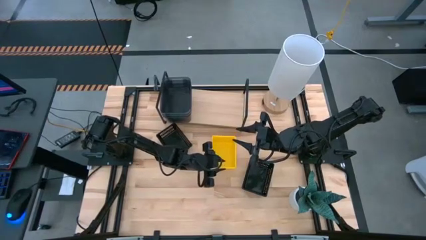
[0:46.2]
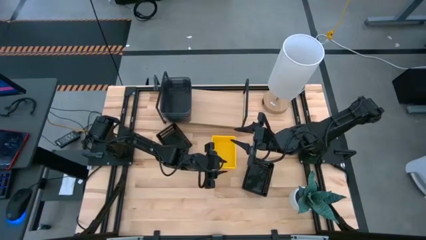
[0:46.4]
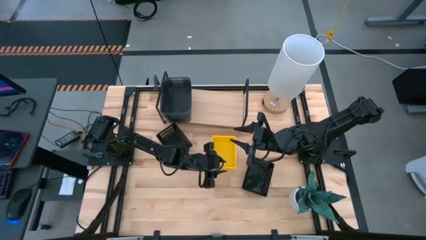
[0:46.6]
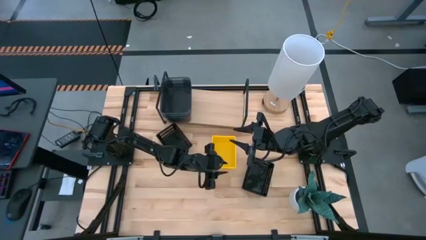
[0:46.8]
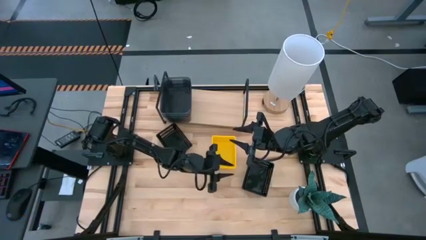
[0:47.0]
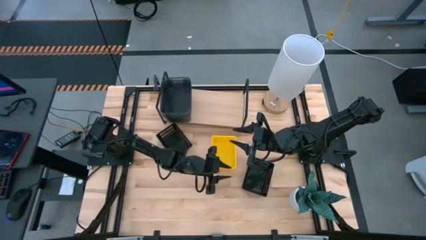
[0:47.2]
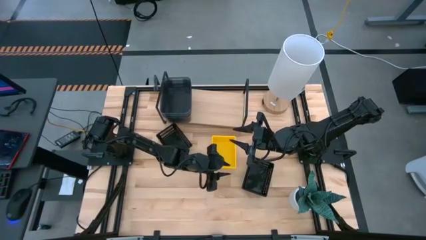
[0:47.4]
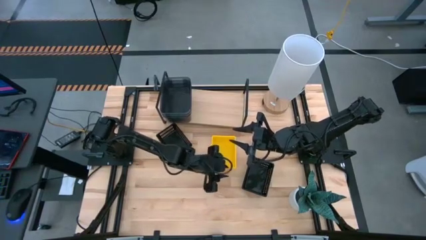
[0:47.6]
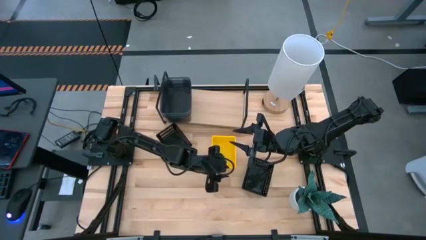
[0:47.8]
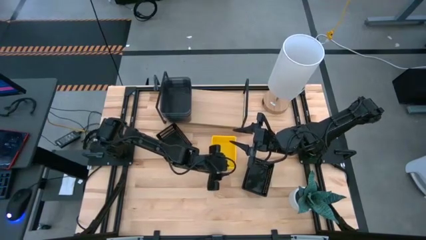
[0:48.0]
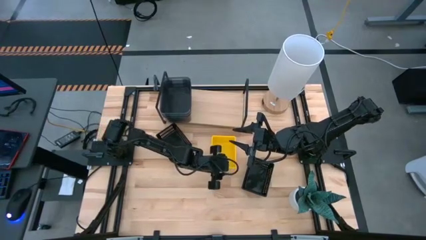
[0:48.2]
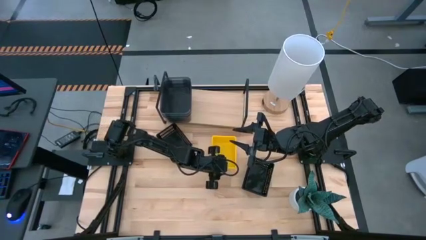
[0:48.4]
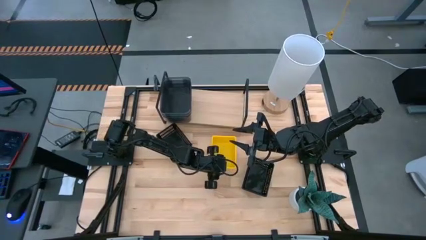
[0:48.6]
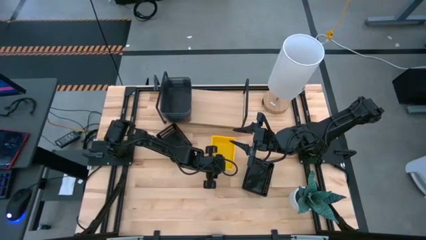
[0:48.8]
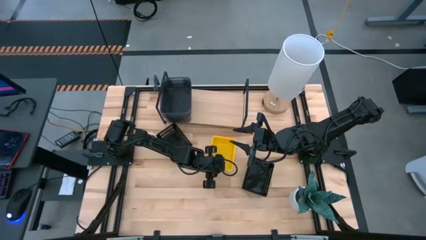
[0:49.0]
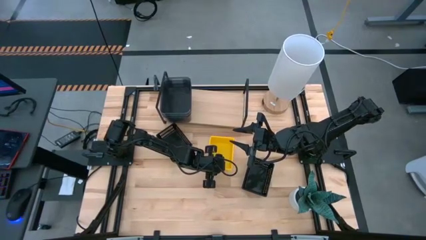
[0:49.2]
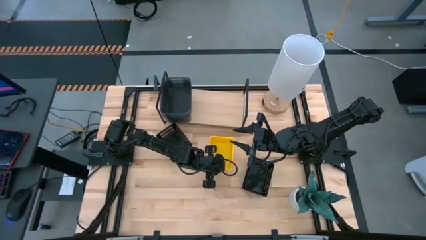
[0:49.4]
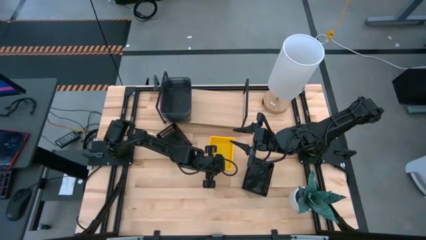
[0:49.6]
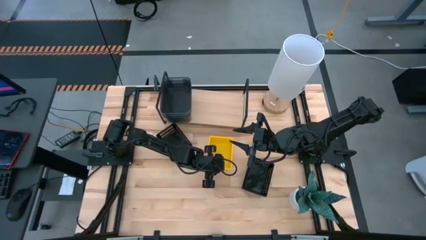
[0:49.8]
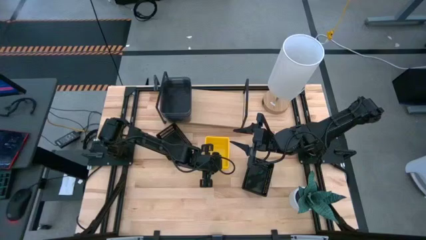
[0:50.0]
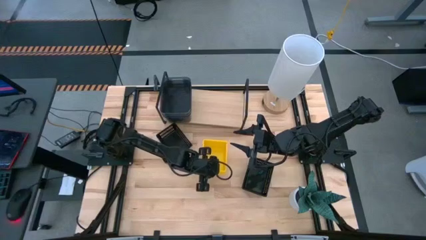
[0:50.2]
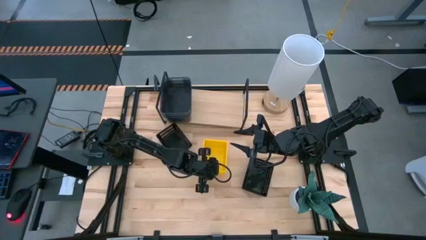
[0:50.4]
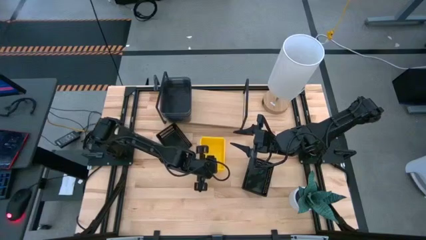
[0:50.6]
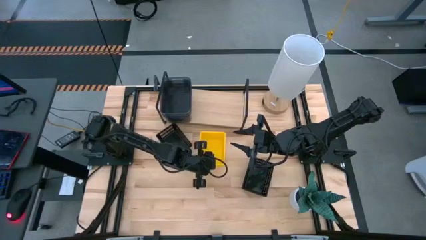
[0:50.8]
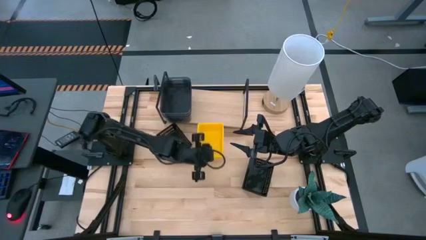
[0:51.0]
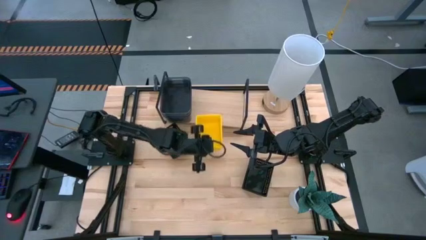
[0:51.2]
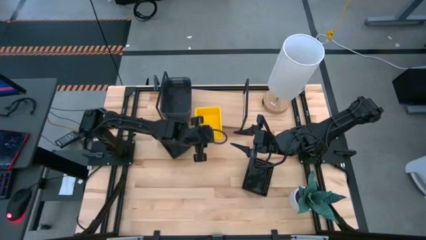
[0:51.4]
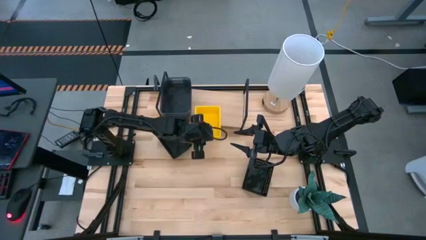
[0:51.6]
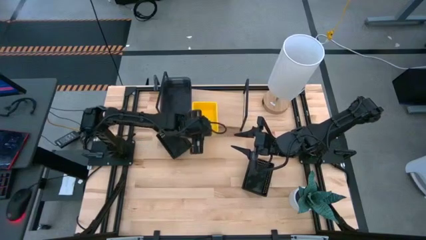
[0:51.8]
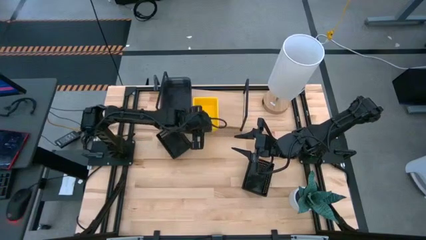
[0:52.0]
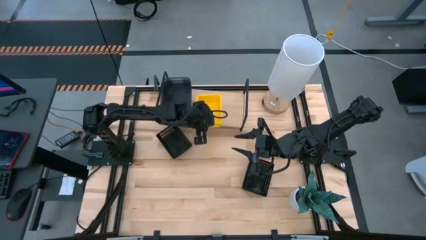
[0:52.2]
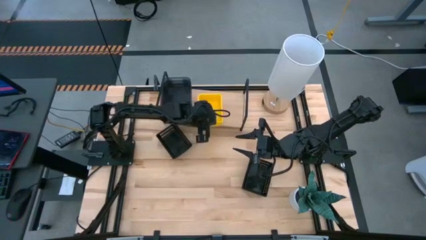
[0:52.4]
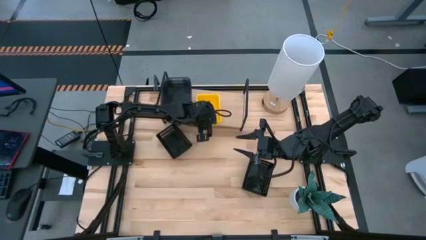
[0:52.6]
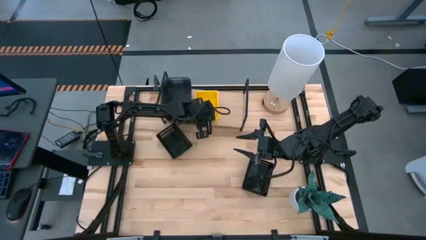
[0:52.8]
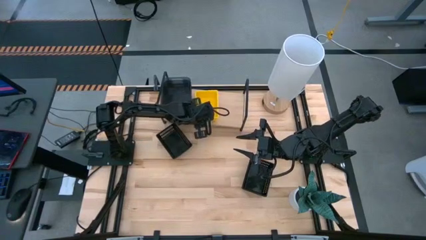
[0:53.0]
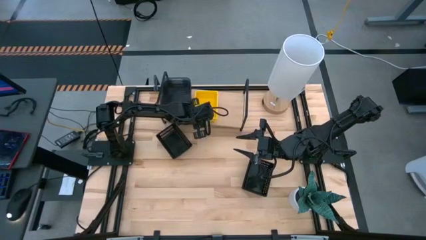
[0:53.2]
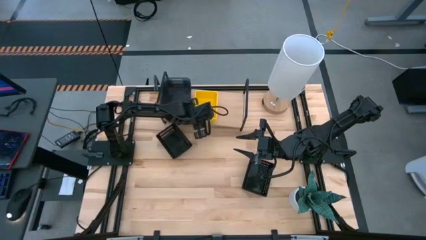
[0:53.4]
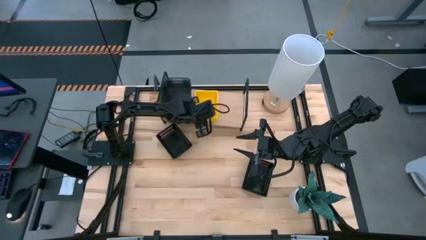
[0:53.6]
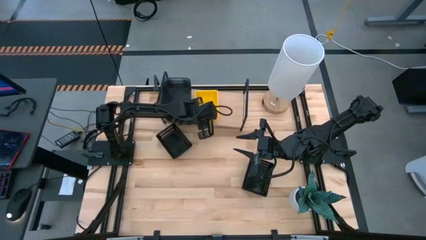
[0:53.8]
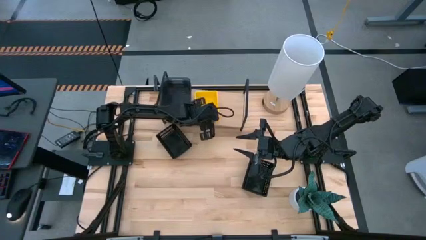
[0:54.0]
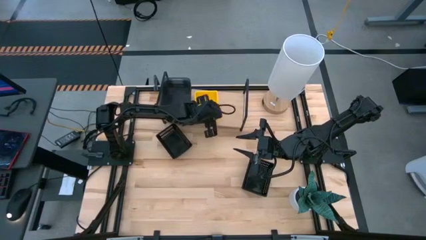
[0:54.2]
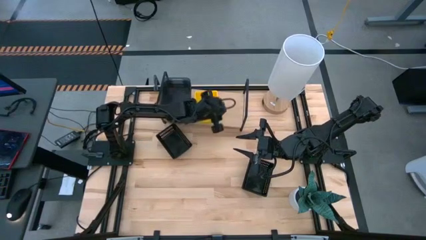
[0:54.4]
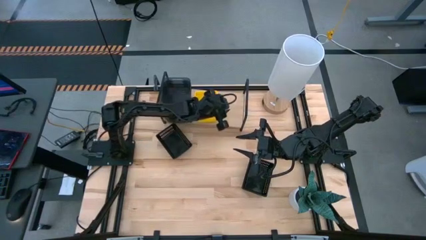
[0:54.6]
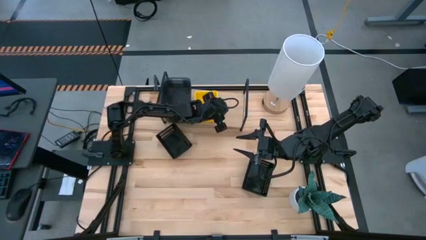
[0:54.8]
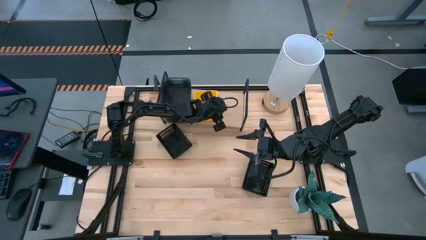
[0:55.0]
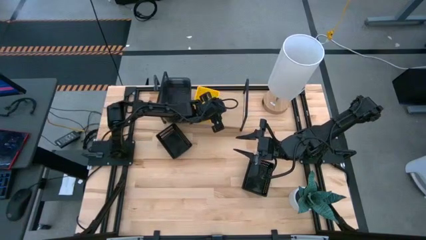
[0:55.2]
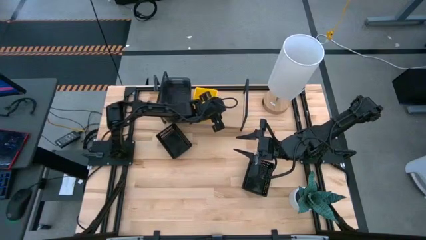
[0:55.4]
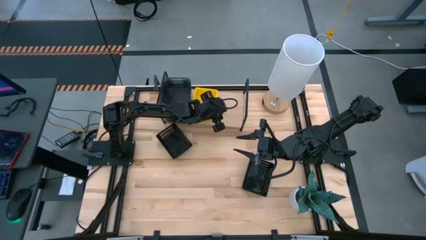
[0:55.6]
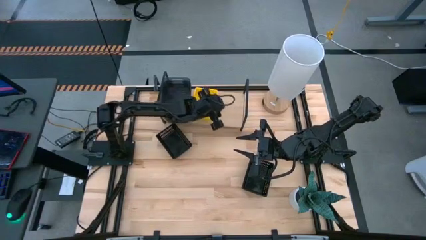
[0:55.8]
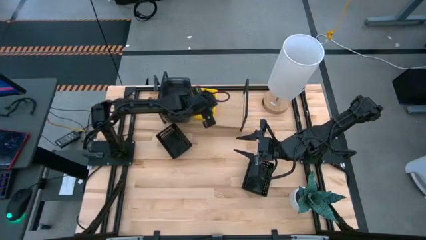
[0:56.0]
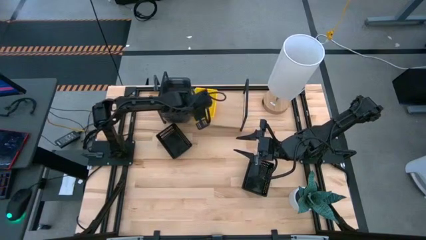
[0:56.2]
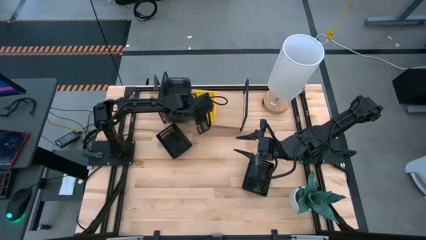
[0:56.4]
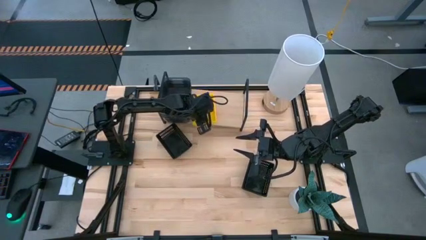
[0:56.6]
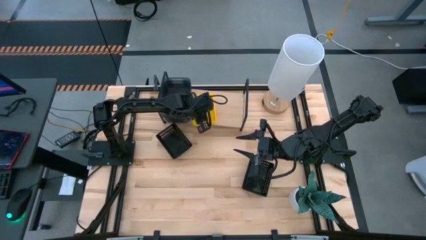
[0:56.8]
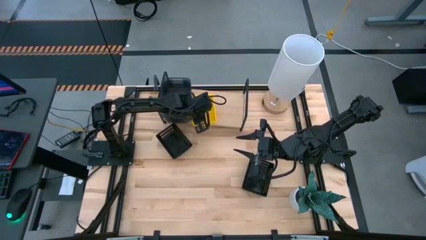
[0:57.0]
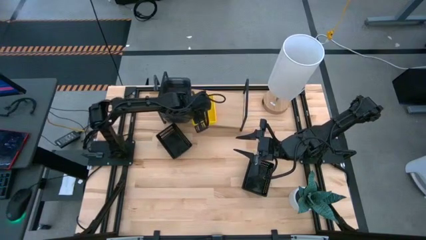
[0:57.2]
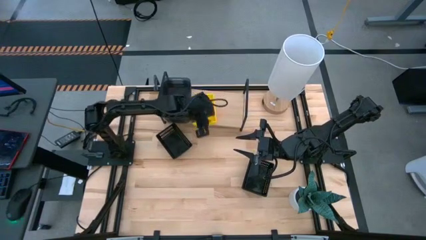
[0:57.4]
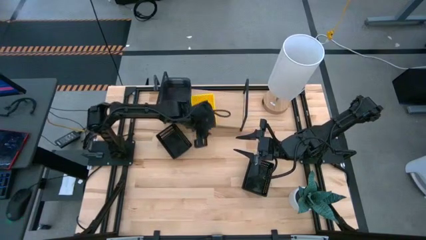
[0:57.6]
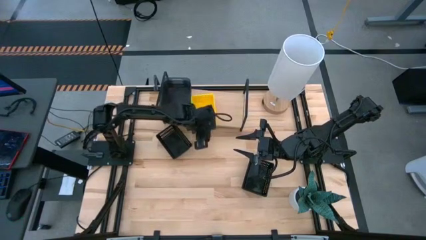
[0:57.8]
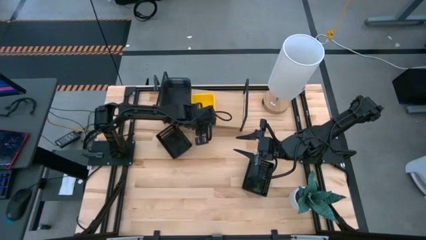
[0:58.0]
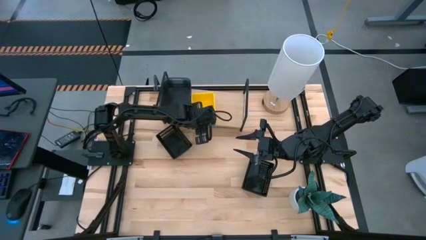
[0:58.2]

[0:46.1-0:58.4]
Task: Stack baskets on shelf by color
Put the stacked yellow bins on the shelf

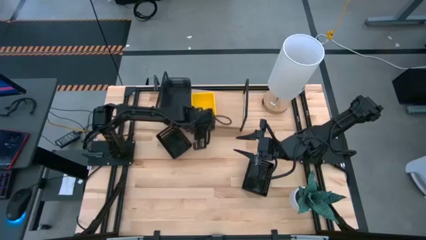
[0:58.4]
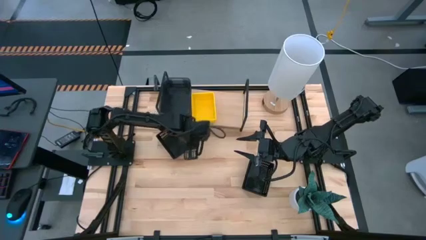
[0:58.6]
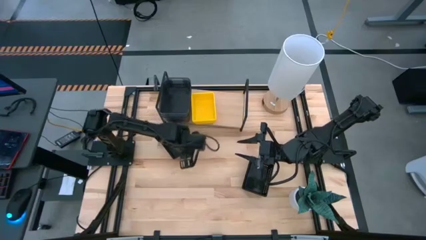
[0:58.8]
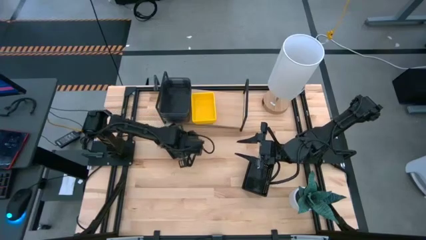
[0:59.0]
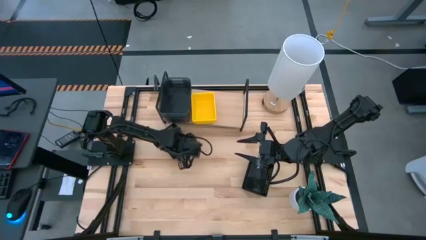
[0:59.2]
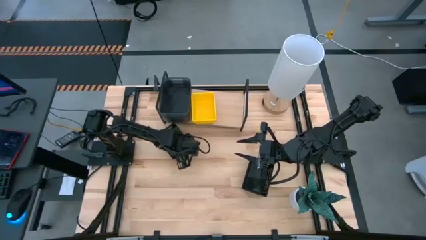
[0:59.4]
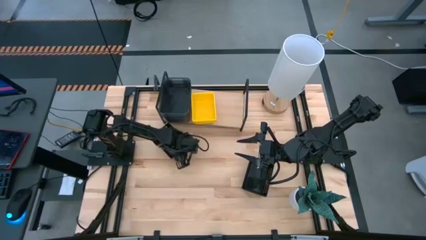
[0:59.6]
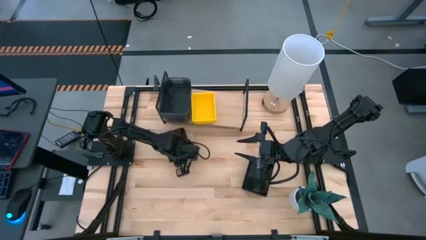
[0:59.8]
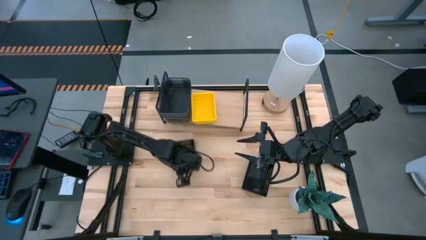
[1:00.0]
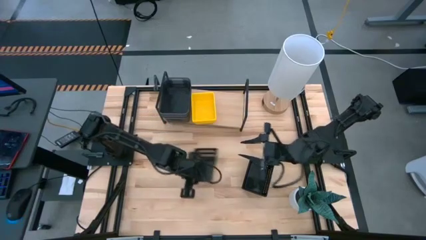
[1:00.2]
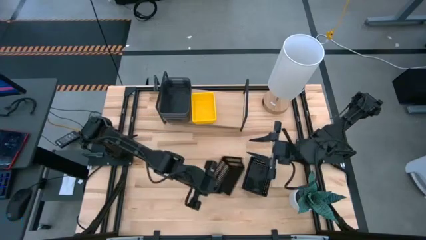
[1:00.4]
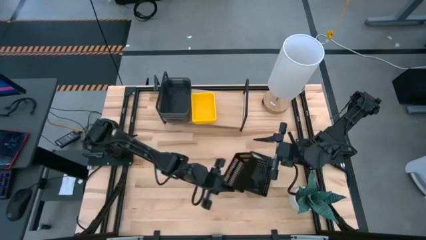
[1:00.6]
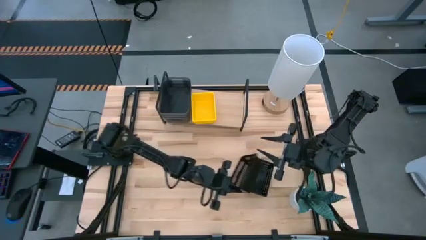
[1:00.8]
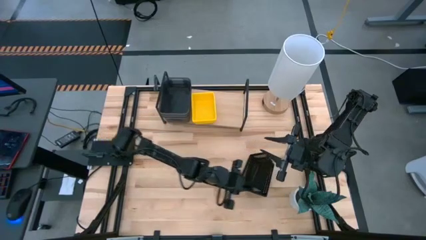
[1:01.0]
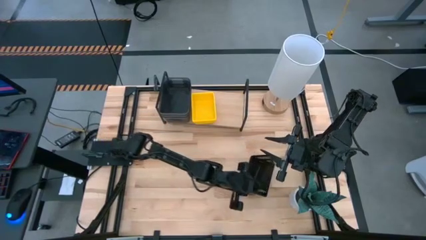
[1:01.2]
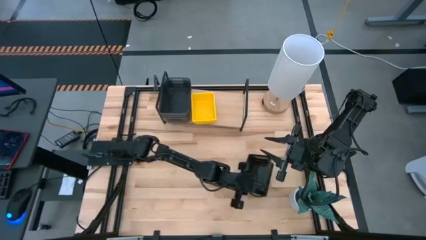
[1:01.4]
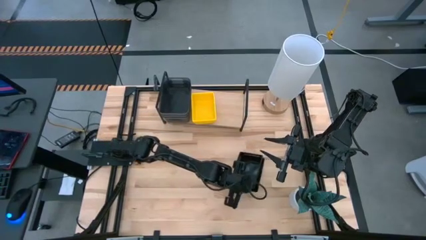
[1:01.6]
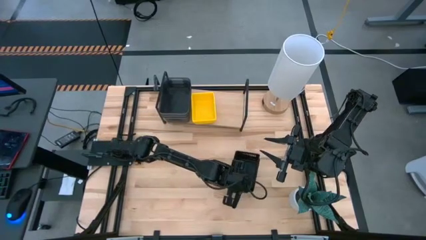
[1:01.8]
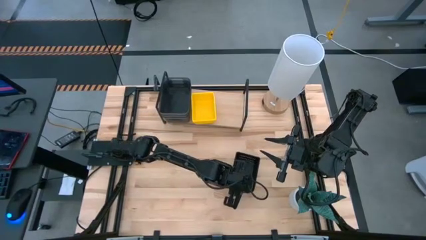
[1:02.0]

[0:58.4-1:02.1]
Stack the left black bin on top of the right black bin

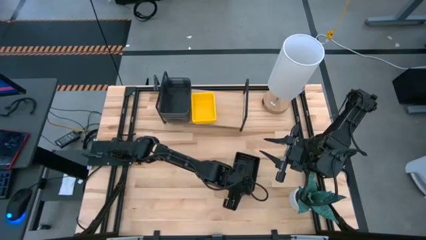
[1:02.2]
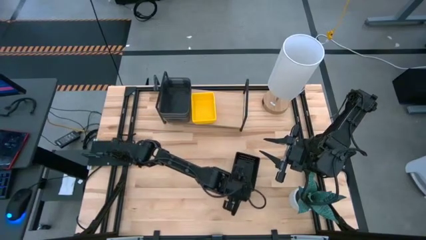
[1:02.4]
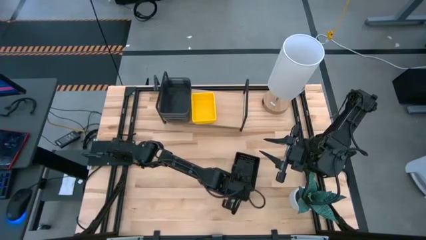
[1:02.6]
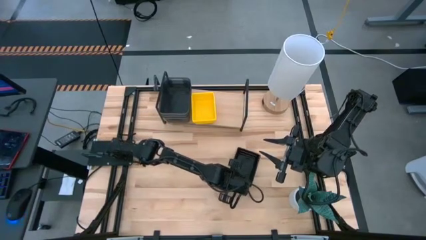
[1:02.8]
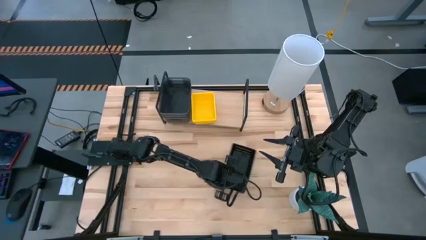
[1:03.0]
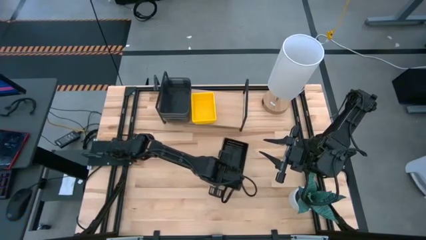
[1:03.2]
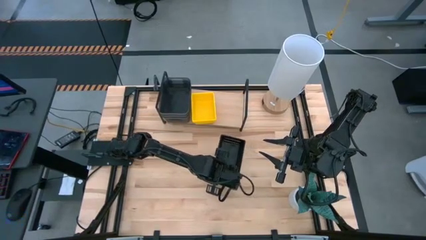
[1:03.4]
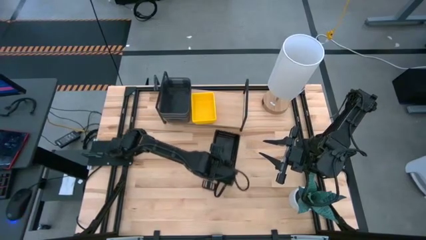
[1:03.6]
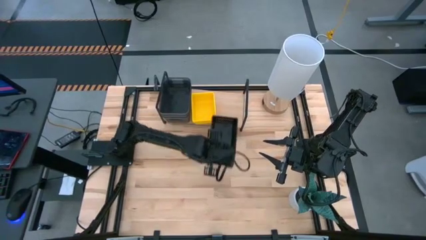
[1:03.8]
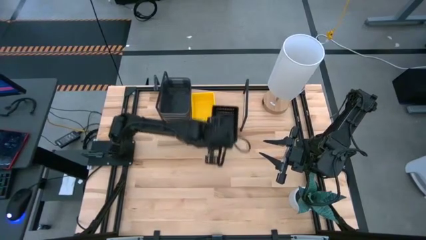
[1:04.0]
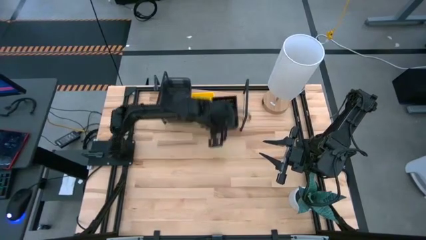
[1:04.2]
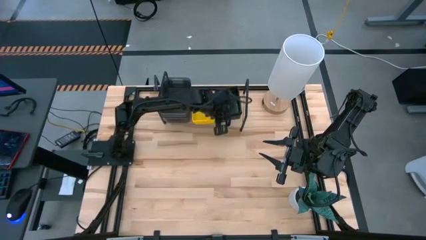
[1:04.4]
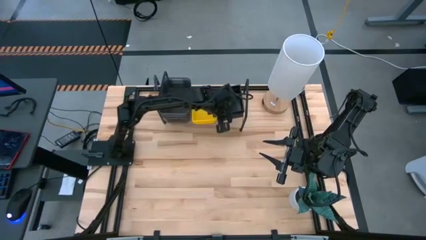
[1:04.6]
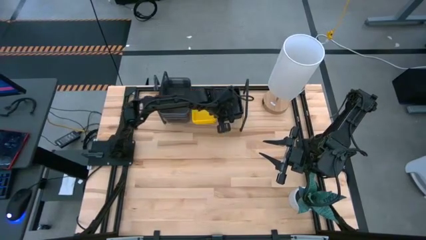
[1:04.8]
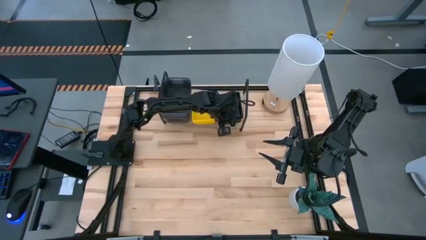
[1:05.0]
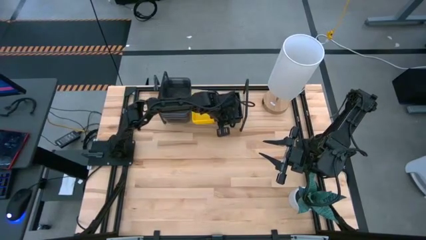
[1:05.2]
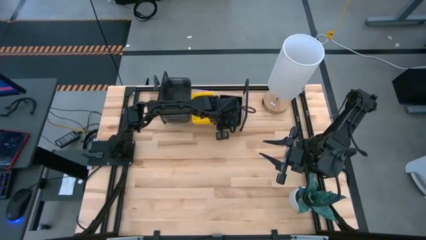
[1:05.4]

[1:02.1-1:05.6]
Put the stacked black bins on the shelf
